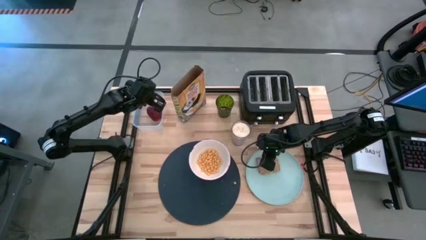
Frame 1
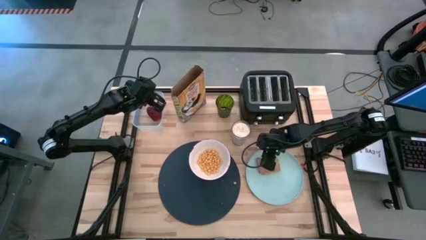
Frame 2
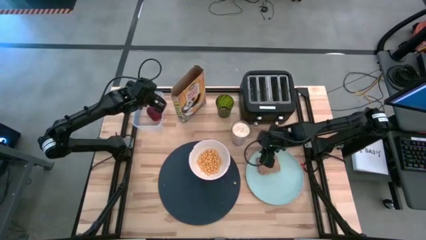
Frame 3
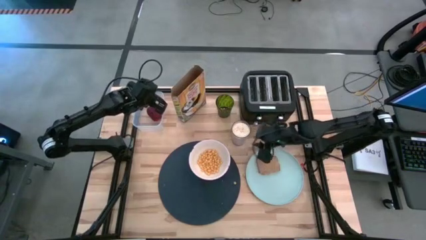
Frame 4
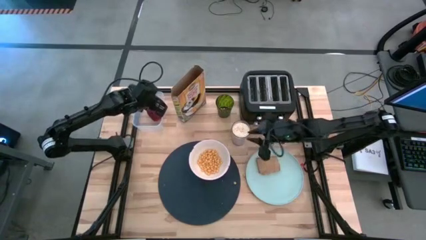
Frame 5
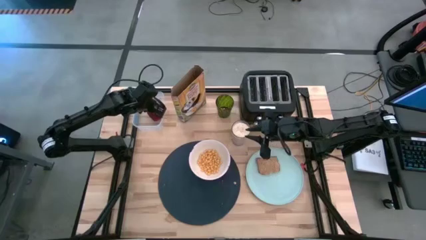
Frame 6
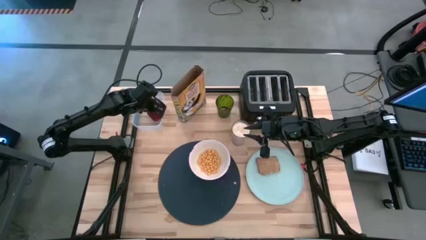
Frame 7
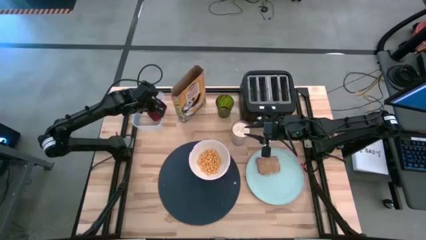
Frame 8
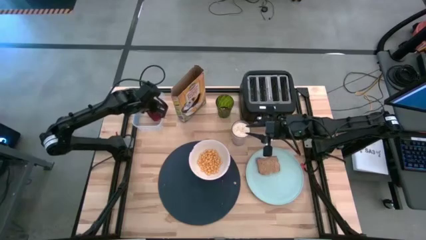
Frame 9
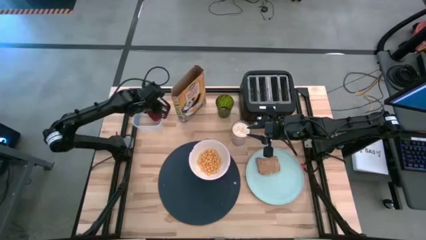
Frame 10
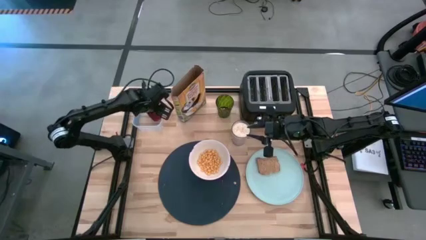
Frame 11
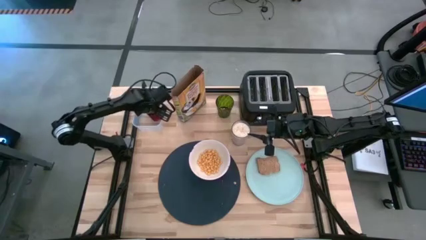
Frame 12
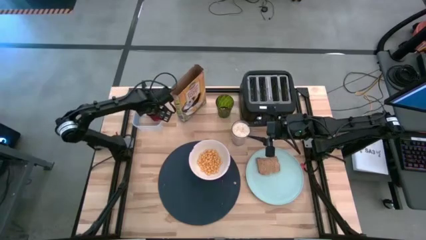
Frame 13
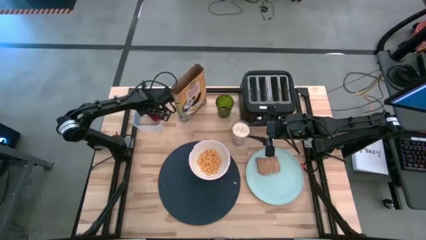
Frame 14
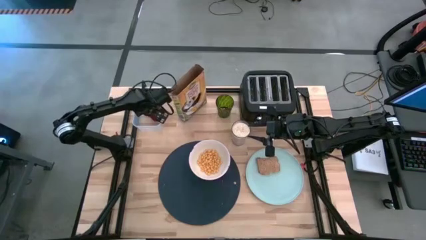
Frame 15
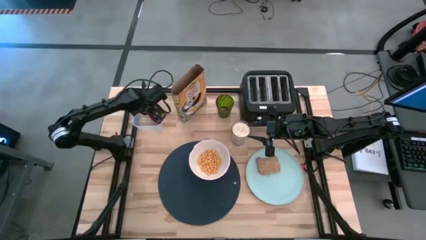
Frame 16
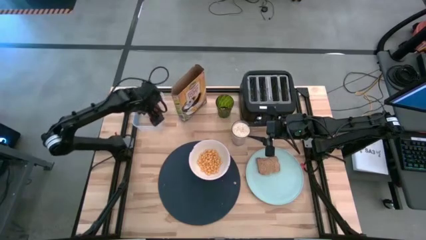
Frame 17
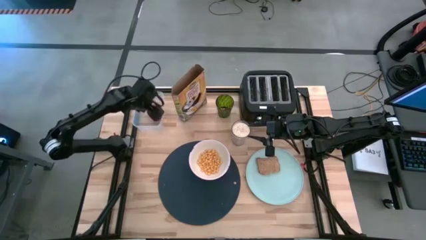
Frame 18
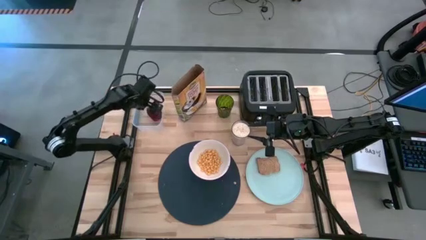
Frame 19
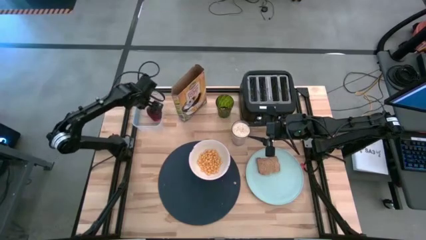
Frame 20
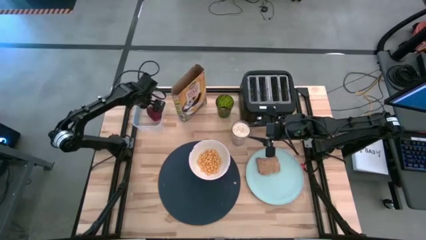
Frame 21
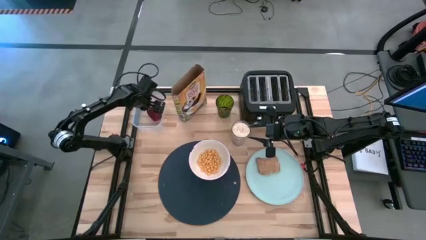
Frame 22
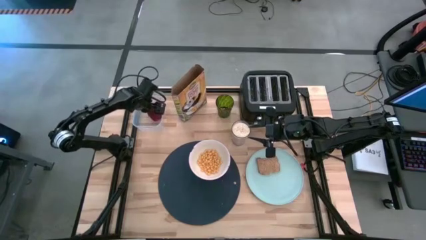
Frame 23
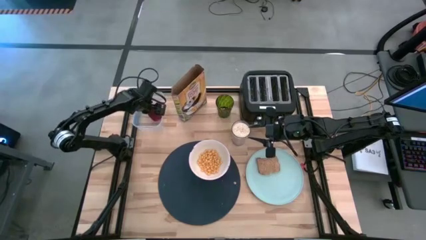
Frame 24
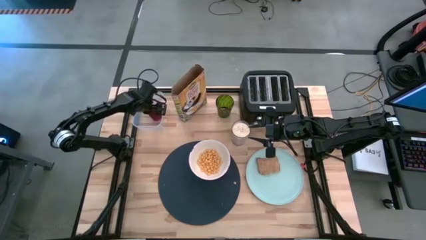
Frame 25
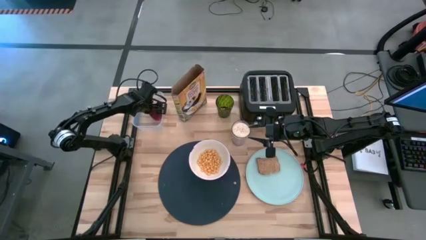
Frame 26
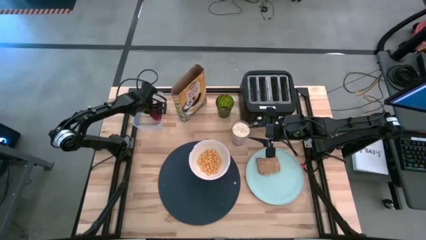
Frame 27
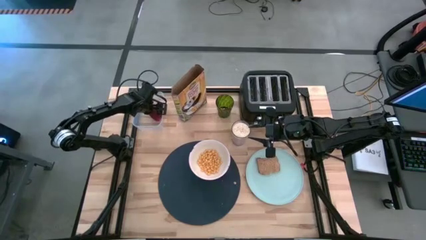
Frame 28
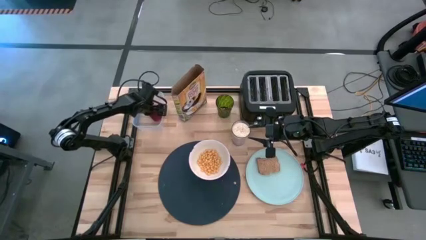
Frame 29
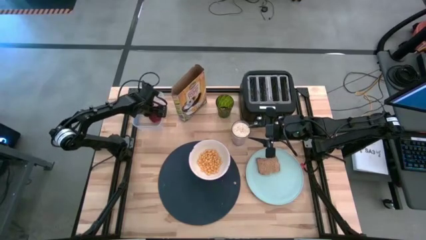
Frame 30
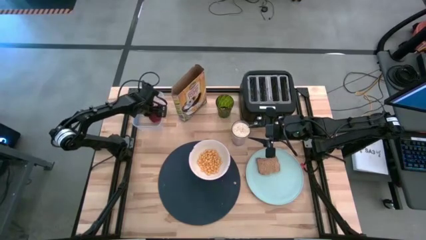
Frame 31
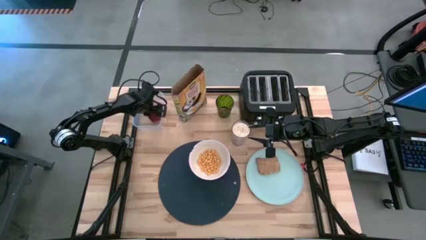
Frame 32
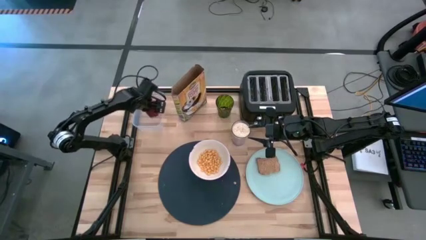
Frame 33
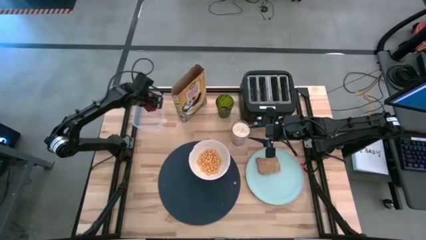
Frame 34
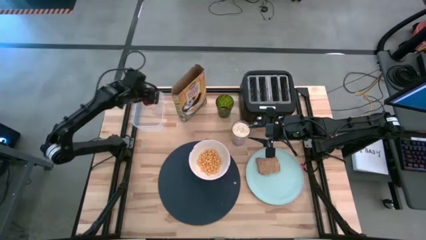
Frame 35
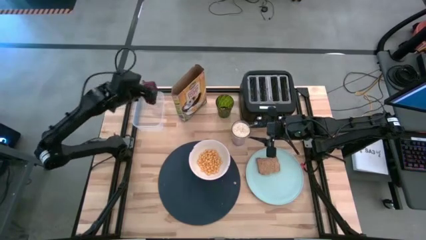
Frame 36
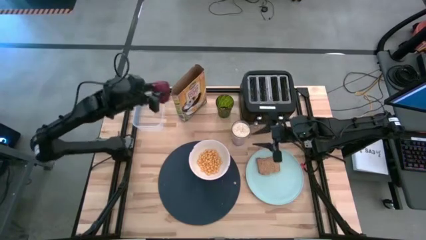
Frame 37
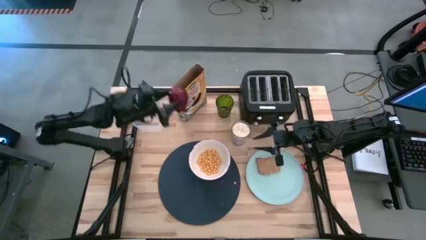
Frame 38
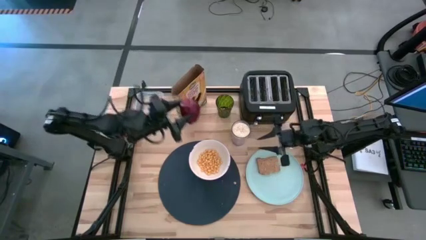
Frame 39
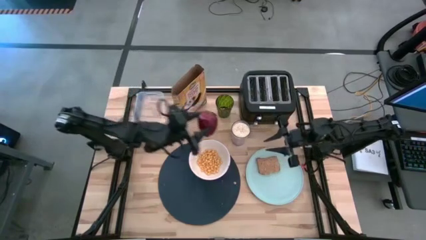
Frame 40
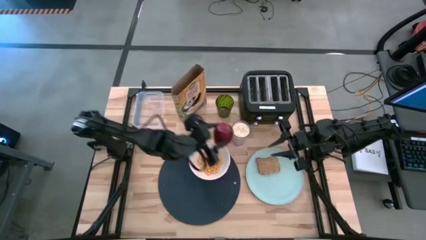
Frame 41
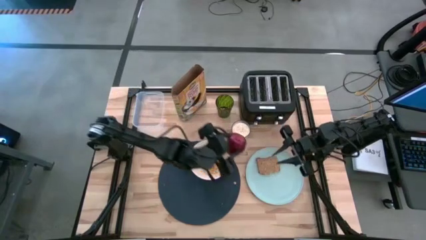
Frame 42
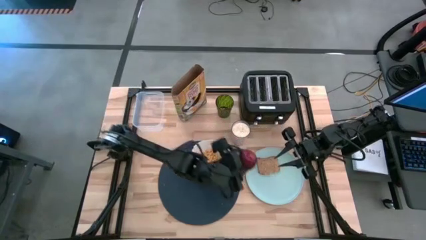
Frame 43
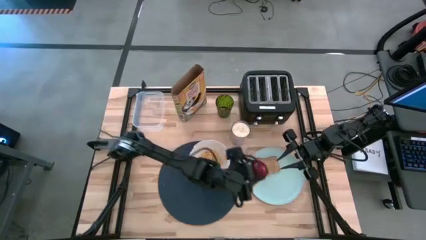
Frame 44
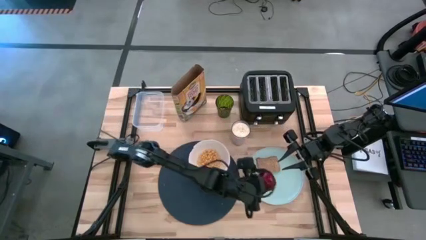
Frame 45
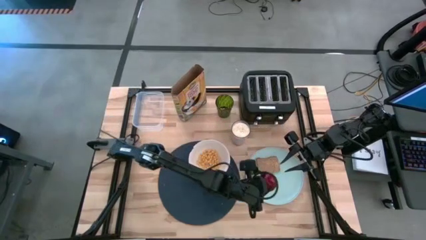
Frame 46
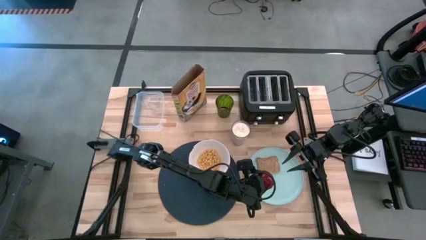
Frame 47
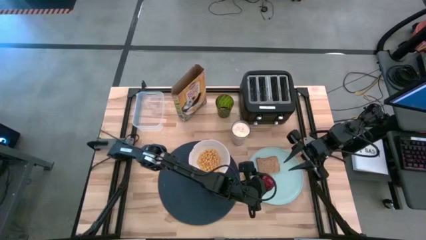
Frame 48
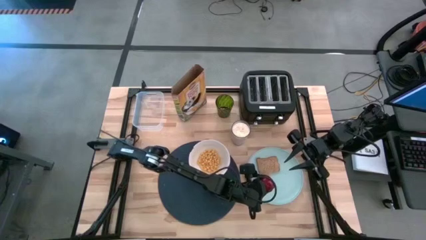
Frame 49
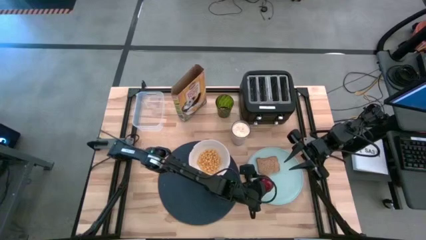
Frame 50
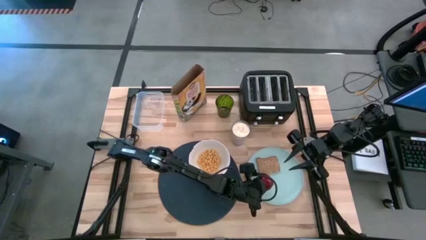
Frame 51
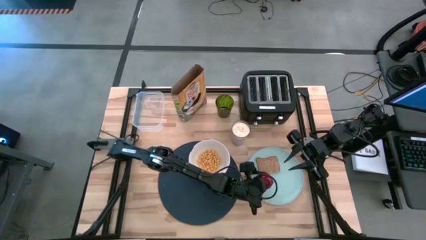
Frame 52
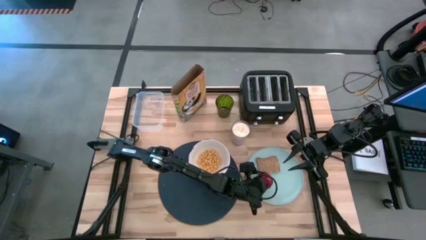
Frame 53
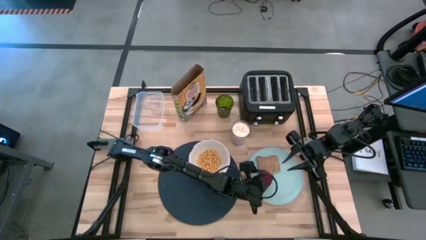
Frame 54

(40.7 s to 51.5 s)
Task: Arrange a breakfast setting
Put the apple from the transparent bin on the light blue plate
